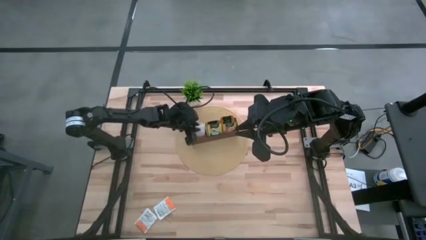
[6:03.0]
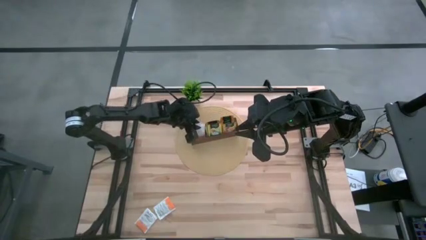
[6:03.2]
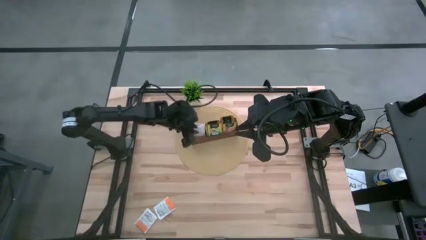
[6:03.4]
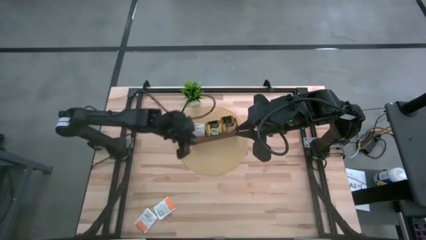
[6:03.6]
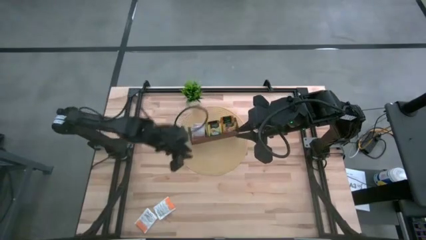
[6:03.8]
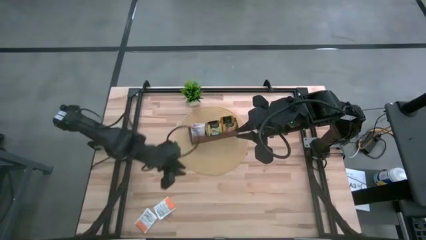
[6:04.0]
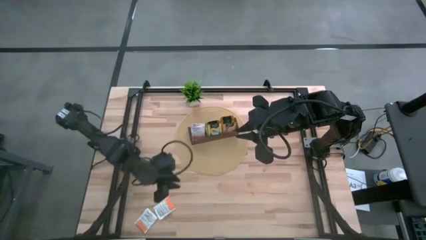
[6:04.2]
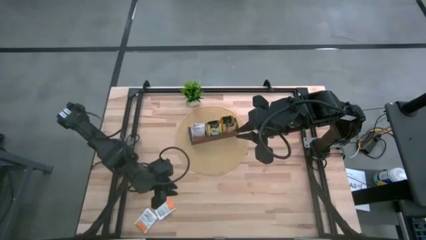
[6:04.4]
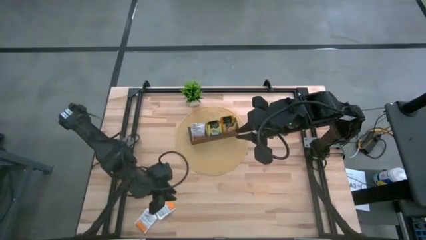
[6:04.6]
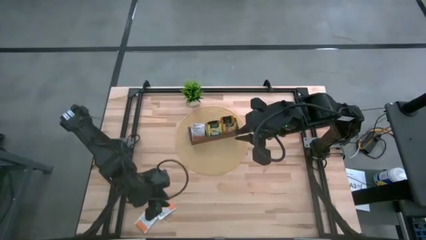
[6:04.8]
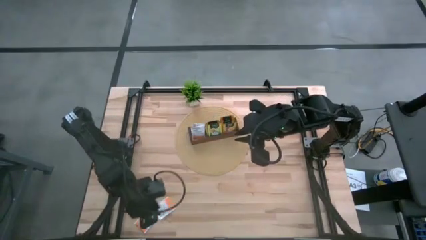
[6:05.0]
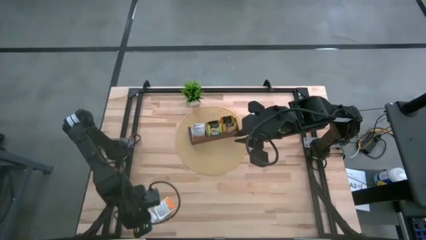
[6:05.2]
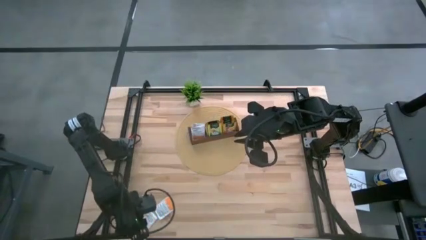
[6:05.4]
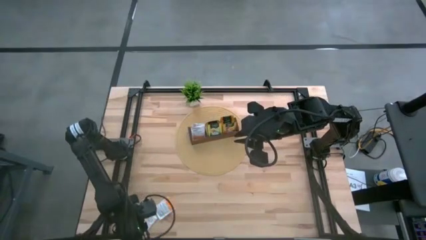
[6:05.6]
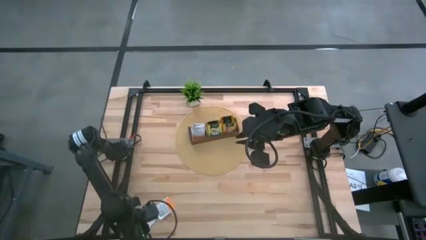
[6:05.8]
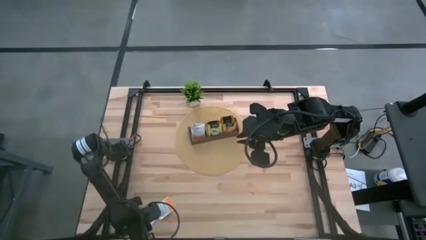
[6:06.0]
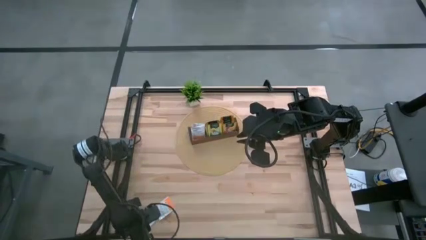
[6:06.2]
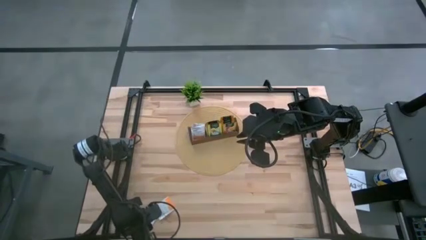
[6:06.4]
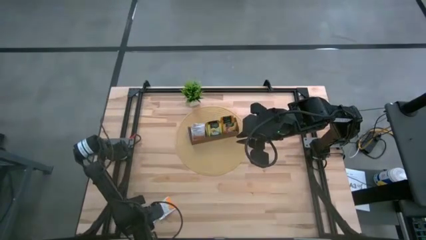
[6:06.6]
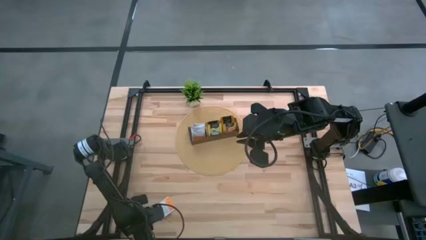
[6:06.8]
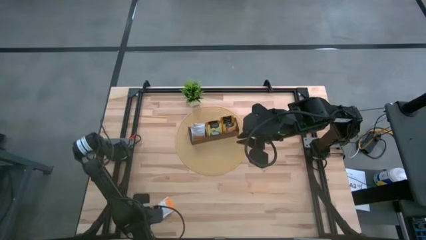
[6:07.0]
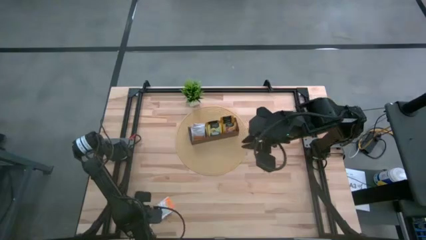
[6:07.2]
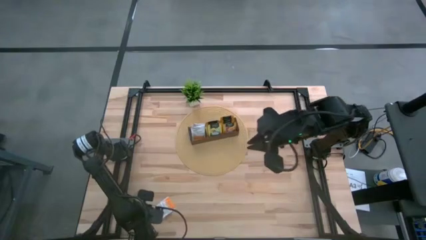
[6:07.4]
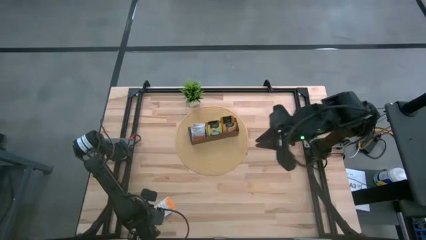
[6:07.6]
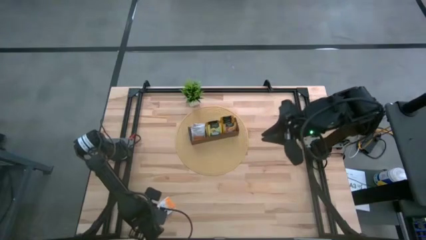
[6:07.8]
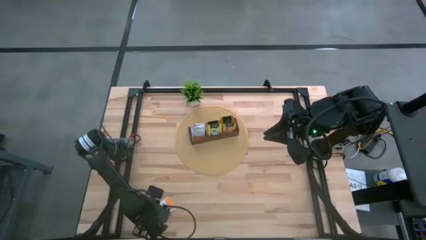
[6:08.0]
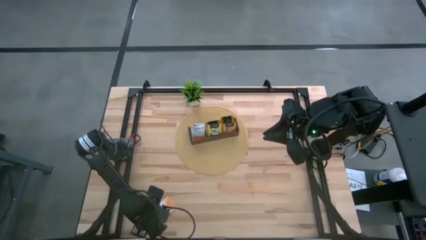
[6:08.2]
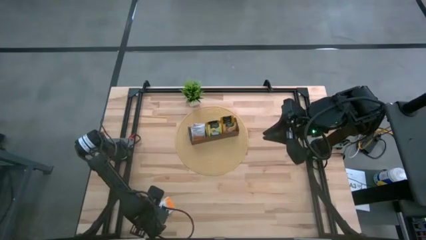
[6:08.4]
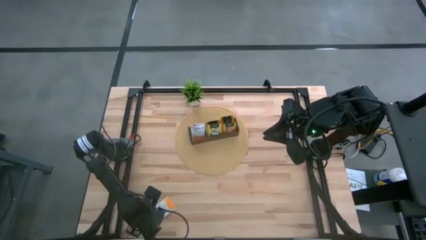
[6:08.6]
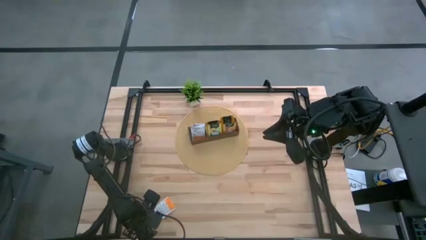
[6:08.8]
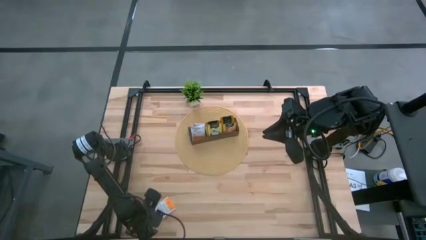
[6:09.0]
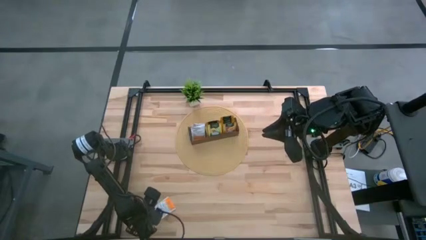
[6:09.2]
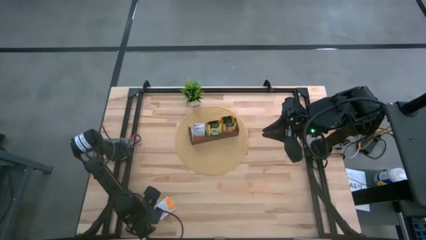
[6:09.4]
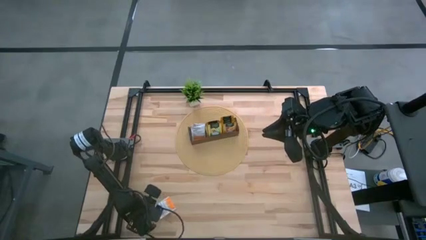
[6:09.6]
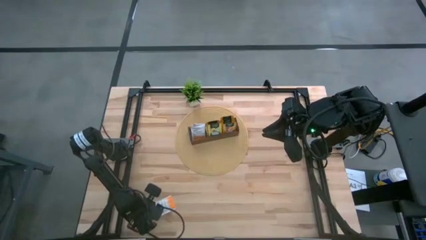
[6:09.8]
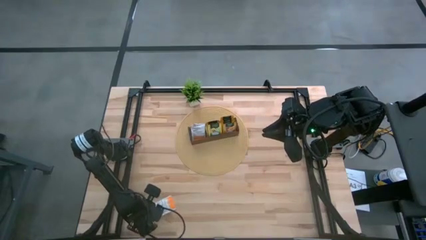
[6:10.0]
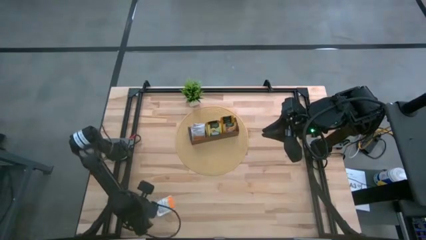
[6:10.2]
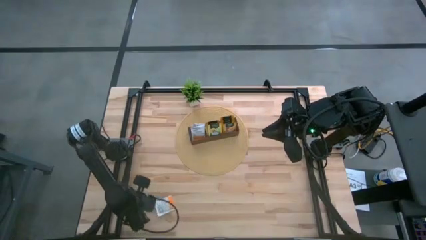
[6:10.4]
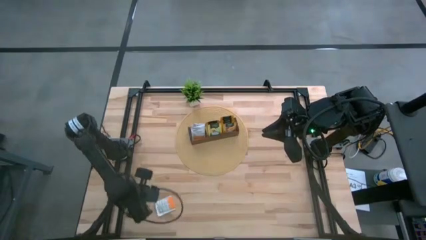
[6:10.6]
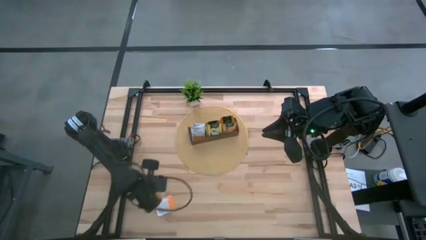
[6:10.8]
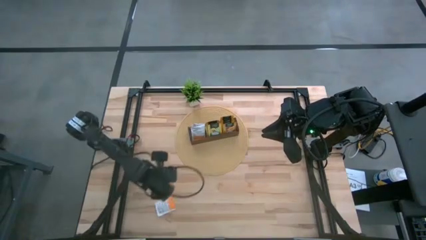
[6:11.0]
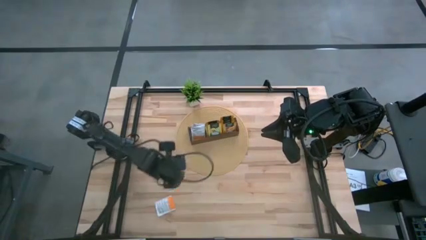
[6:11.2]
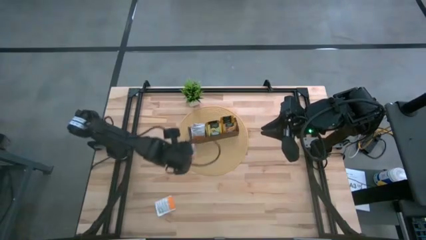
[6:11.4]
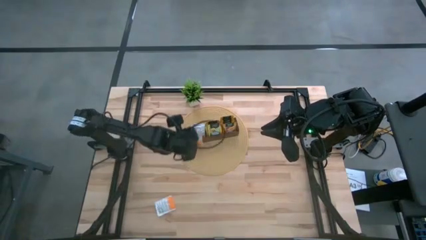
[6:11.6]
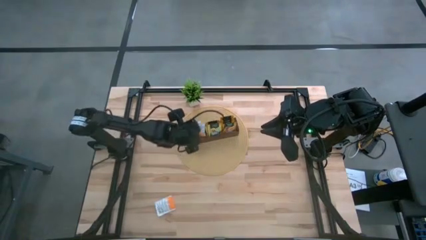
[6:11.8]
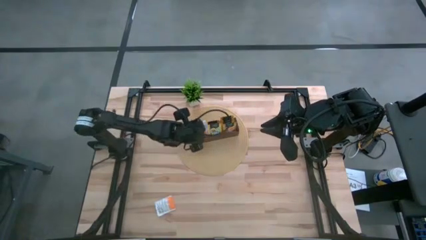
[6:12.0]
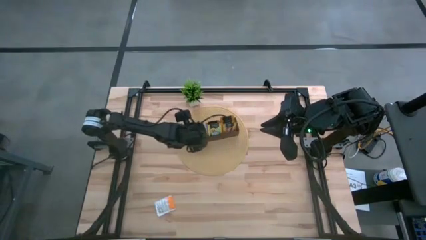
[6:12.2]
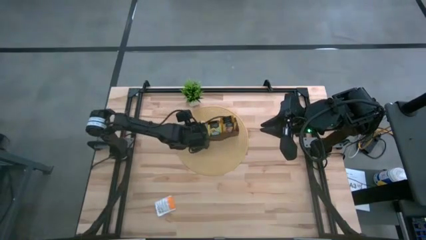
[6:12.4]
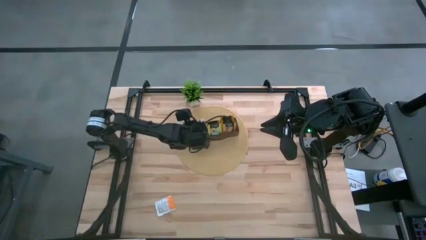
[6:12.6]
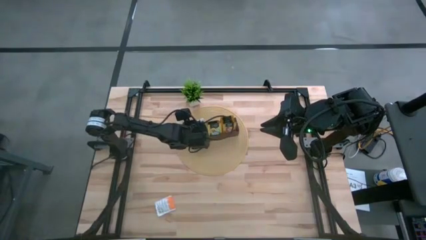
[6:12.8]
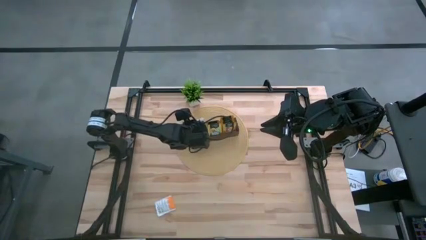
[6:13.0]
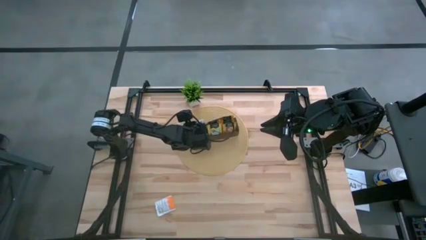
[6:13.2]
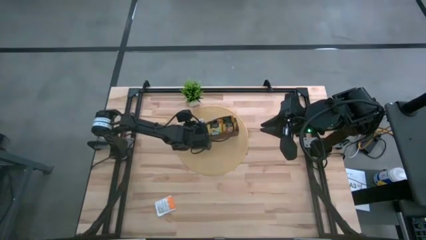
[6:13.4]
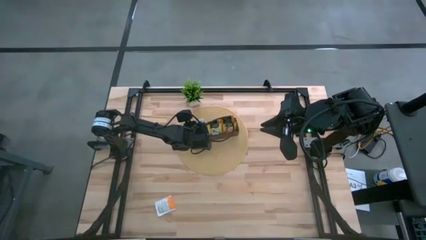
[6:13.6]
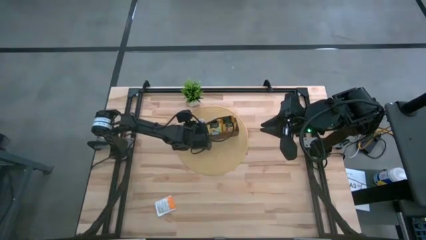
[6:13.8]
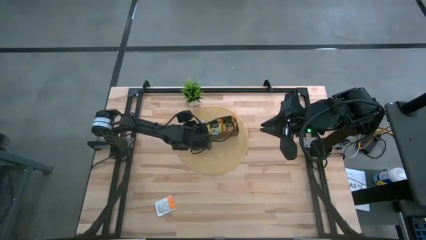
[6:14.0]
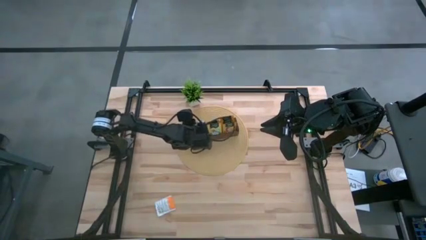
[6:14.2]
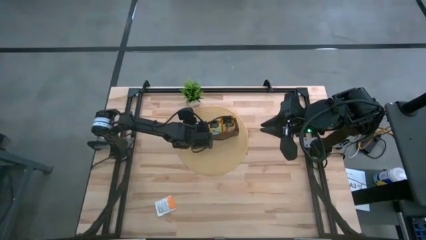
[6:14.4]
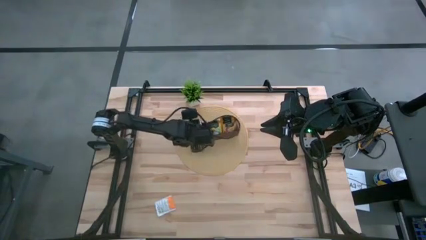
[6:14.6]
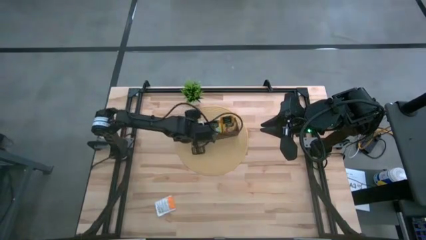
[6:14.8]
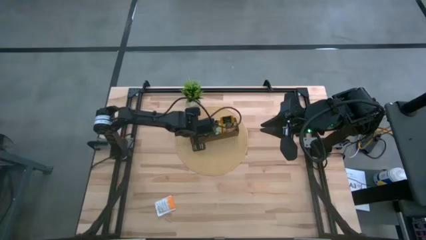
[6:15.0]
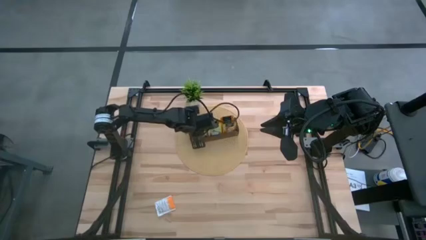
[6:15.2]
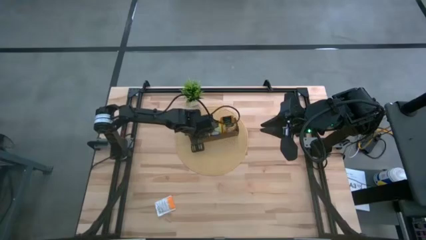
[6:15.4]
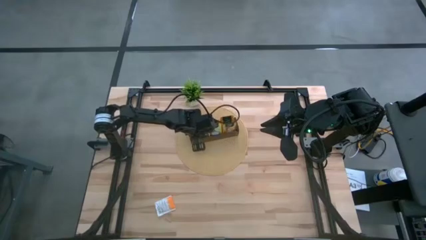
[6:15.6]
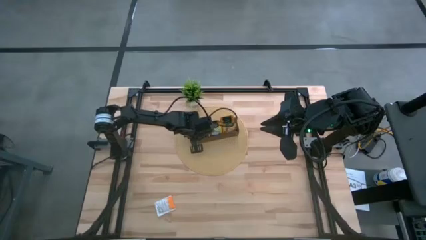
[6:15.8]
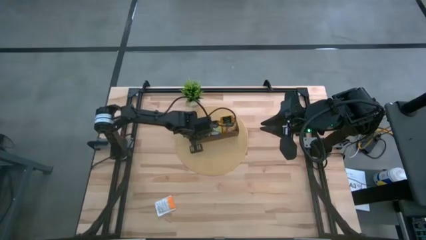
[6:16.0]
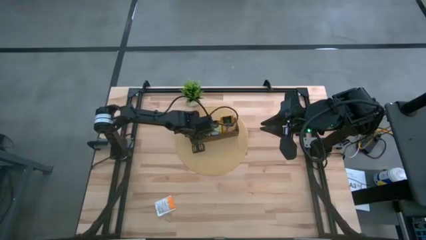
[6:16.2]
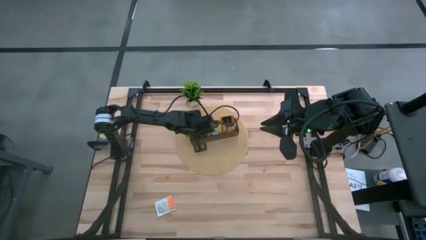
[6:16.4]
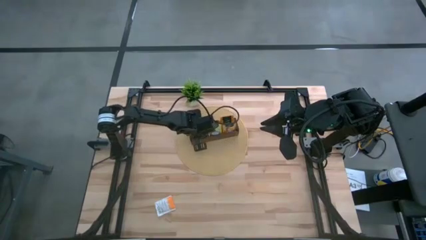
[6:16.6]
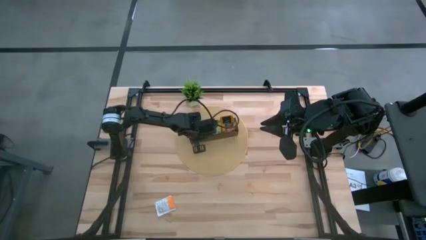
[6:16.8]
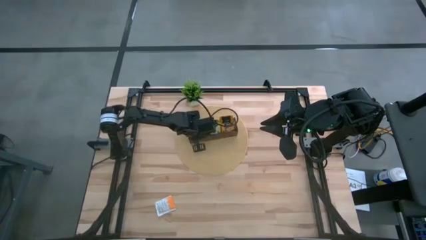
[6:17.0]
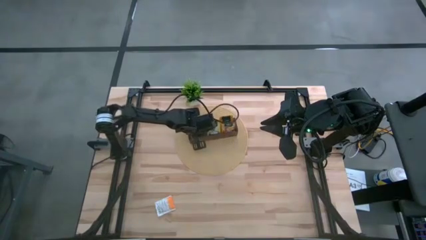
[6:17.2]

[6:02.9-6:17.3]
Task: Pick & Place Tea
Put the white tea bag into the left section of the wooden organizer

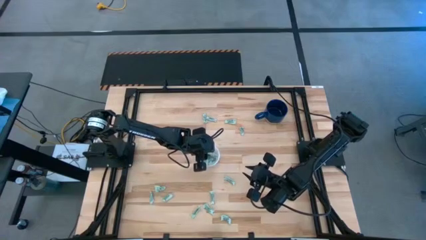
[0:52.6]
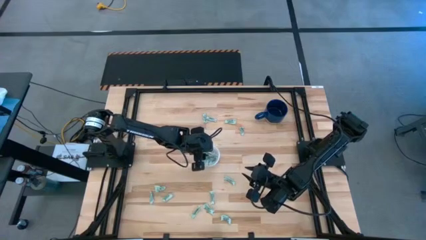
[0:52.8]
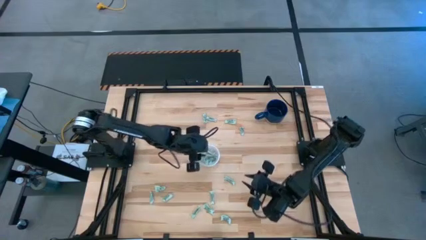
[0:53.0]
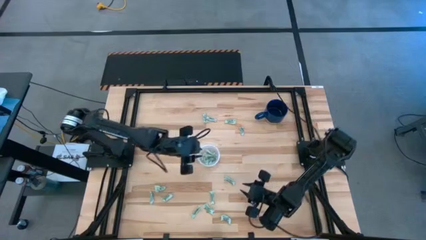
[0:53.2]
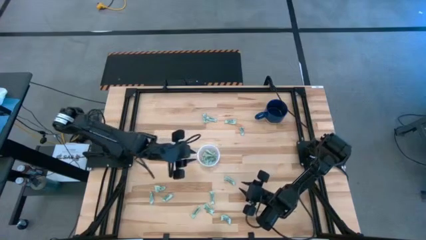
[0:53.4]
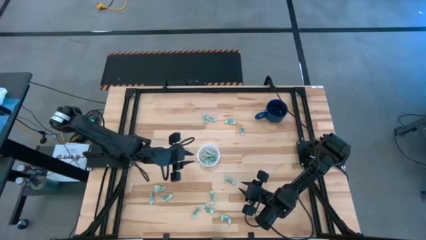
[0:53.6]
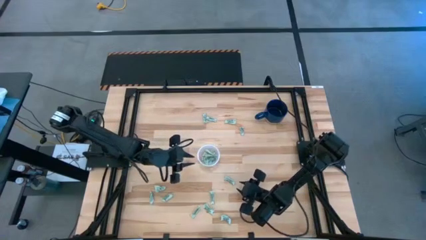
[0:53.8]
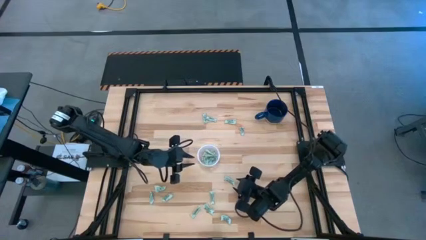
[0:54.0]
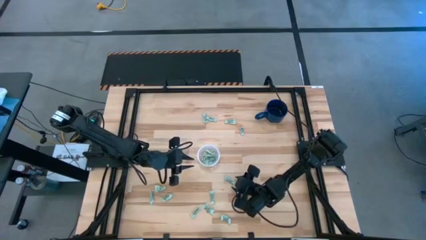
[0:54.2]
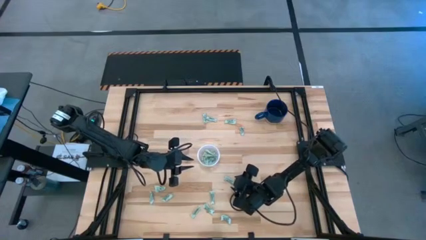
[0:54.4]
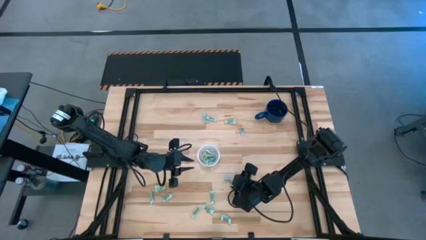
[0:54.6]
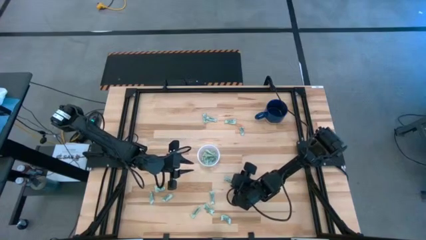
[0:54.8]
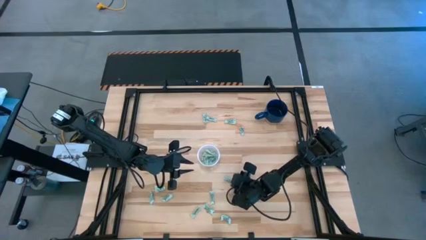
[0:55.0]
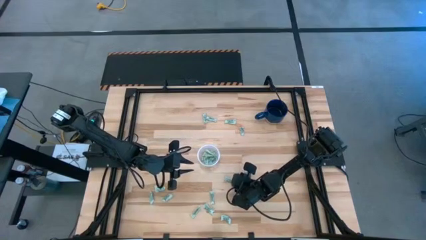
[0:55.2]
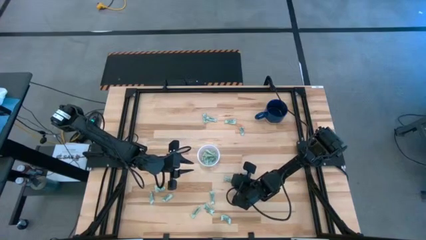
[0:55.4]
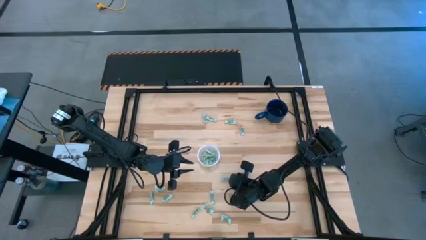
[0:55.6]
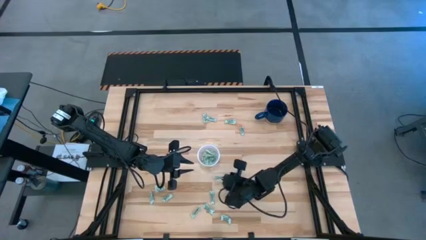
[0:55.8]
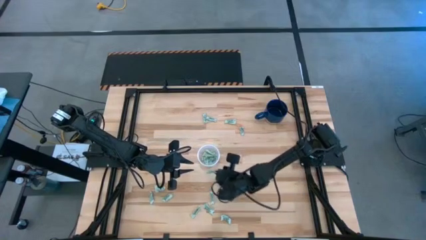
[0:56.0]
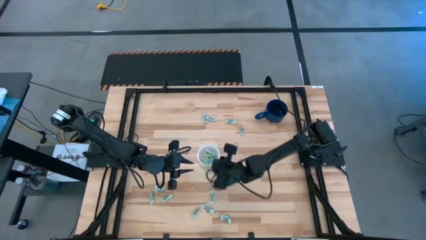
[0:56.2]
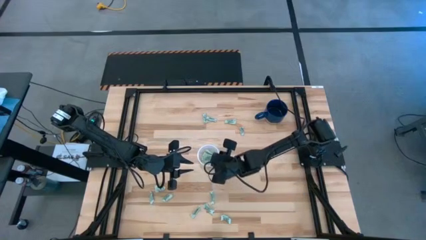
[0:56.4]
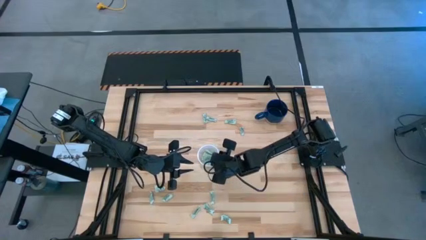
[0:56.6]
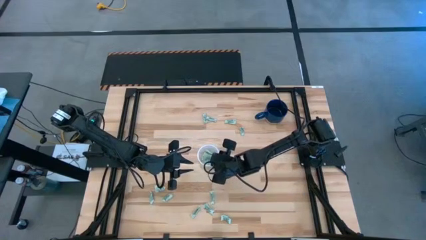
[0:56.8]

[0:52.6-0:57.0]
Task: Pick and place items into bin
Put the stevia packet into the transparent bin
